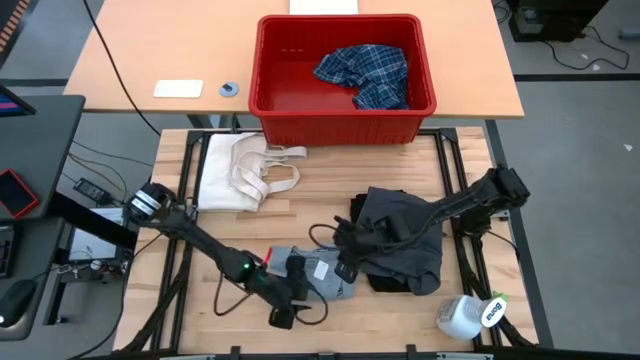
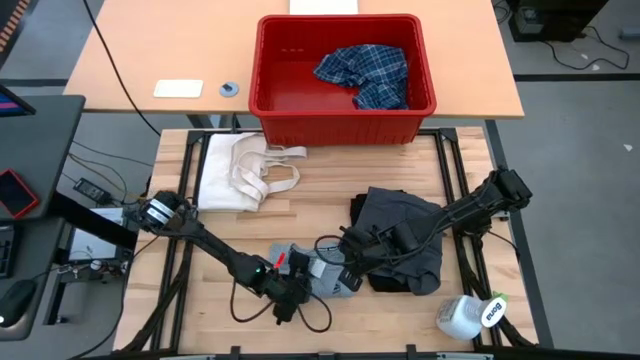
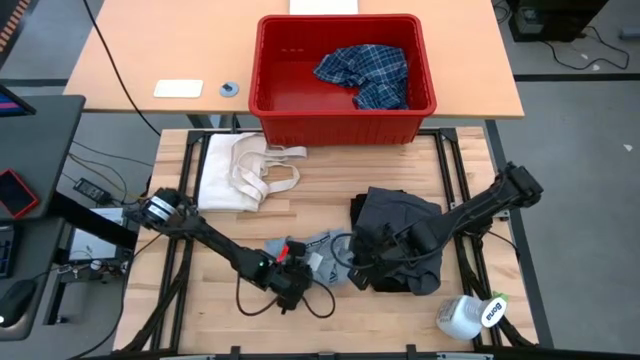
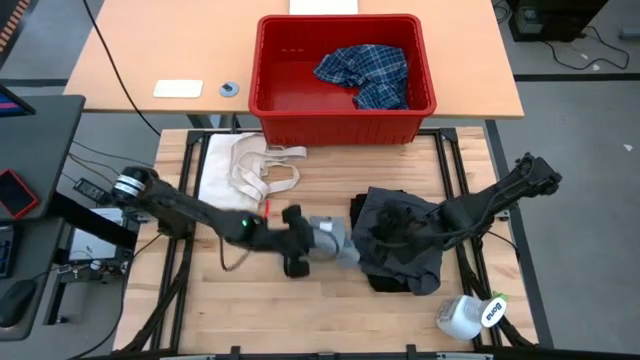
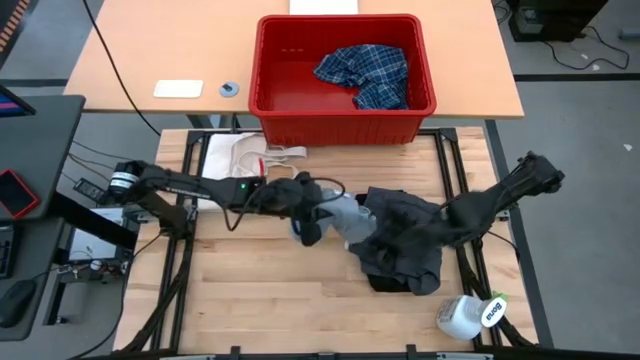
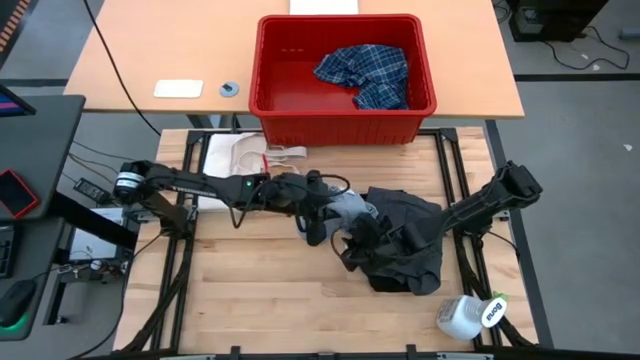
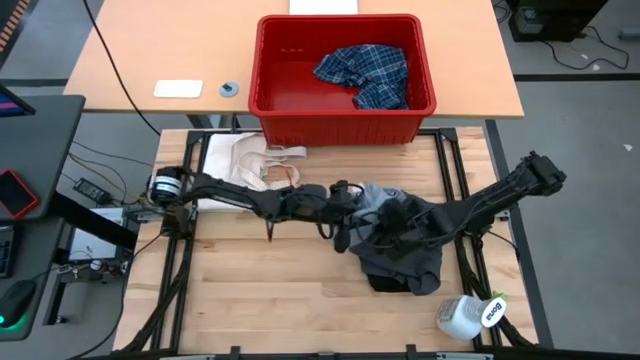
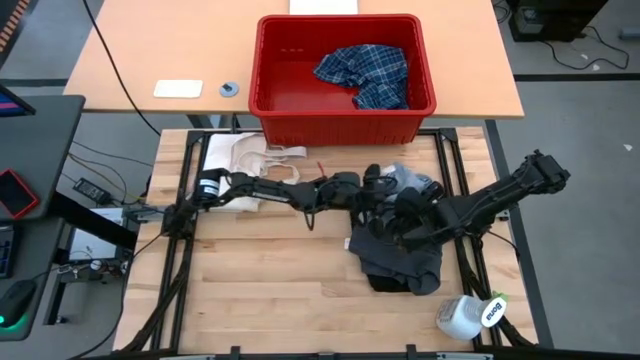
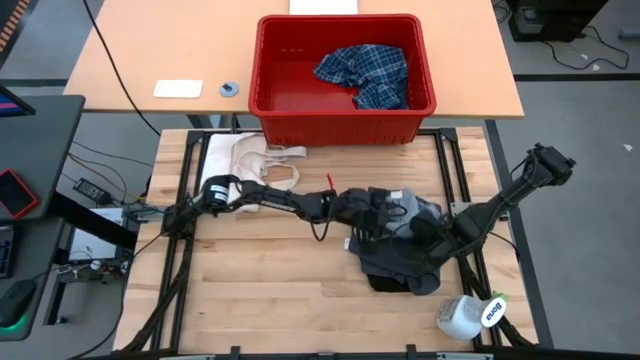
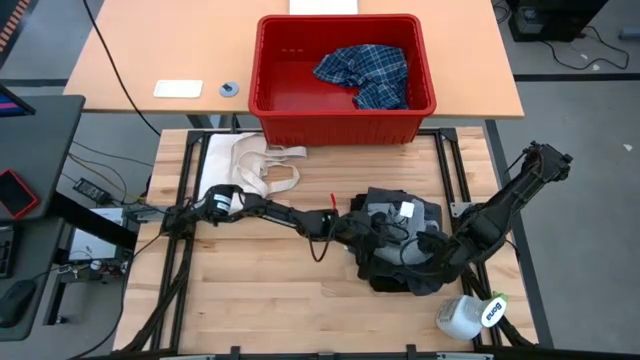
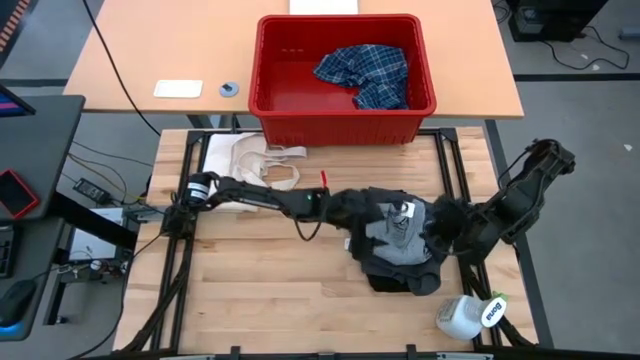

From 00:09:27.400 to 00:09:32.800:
Task: Fold Laundry from Bin
Stack the folded gray shirt on top of the folded gray pants

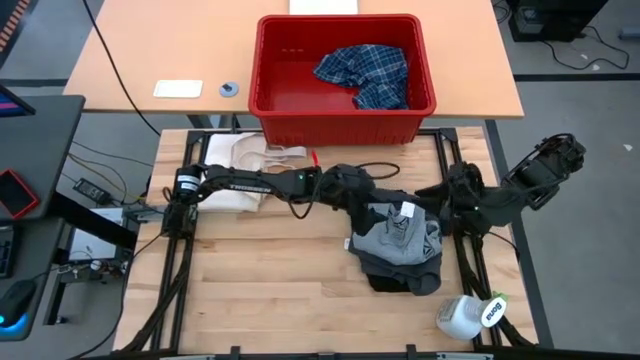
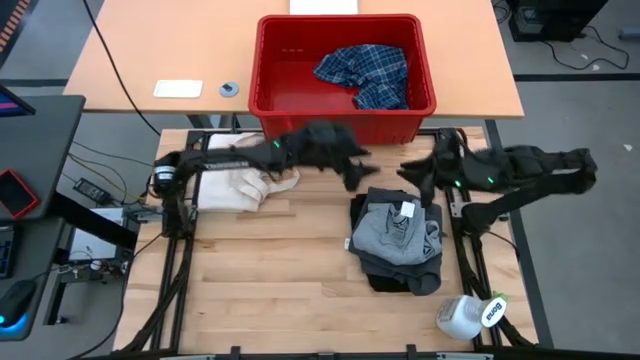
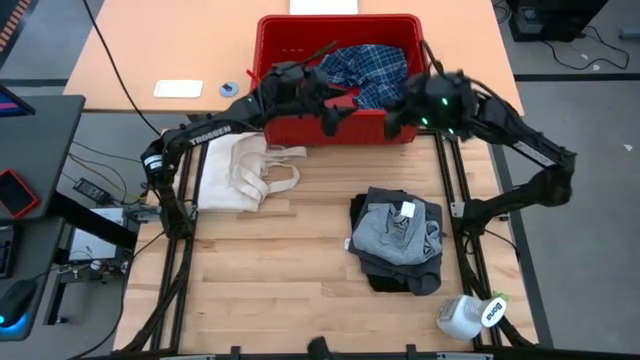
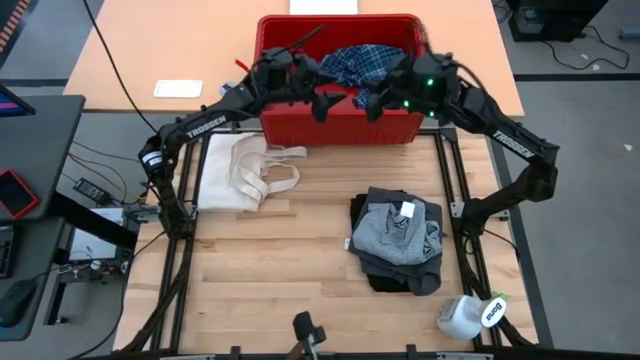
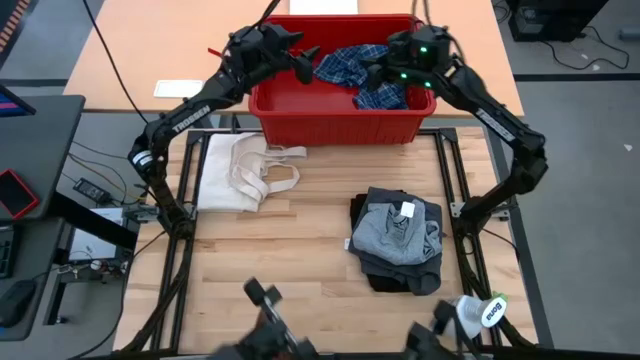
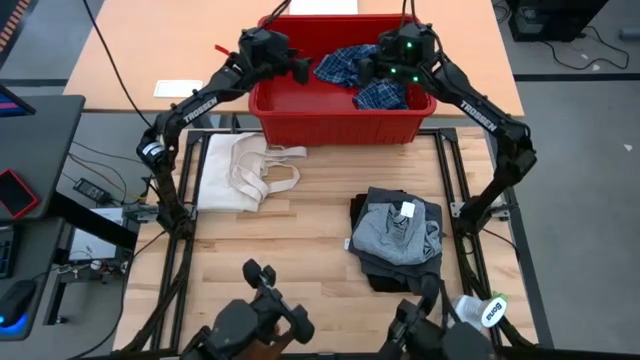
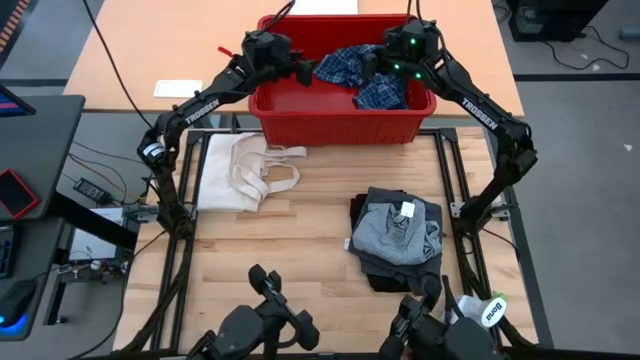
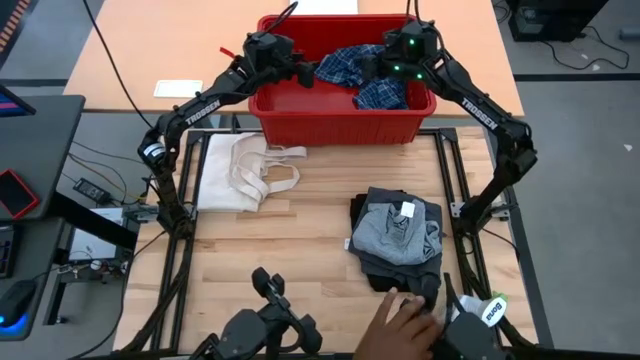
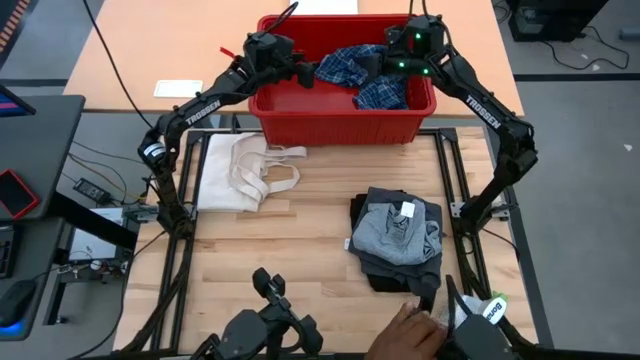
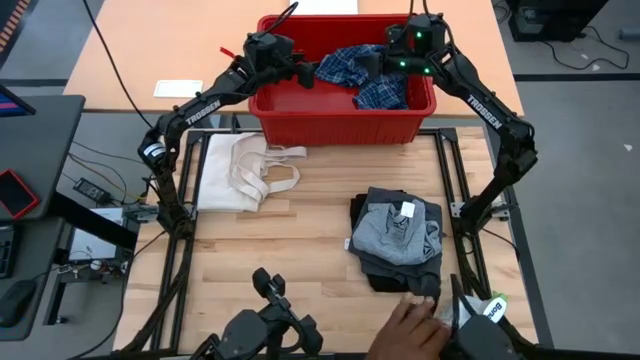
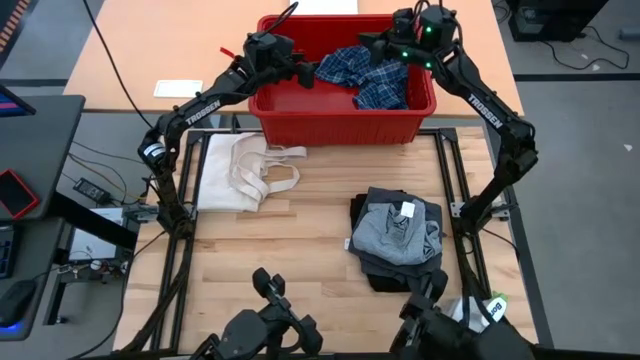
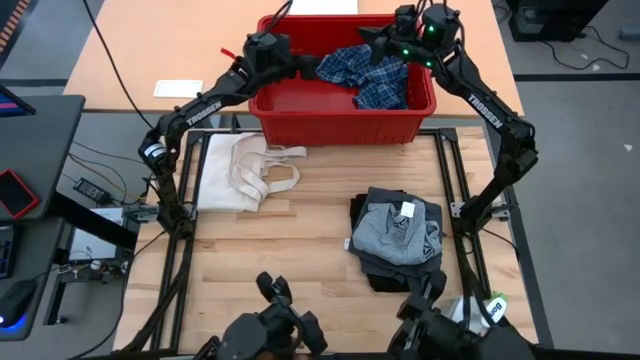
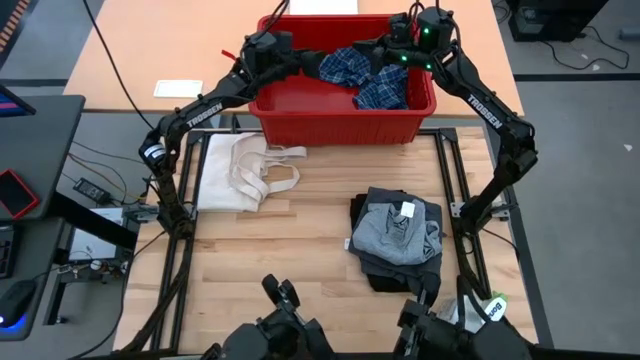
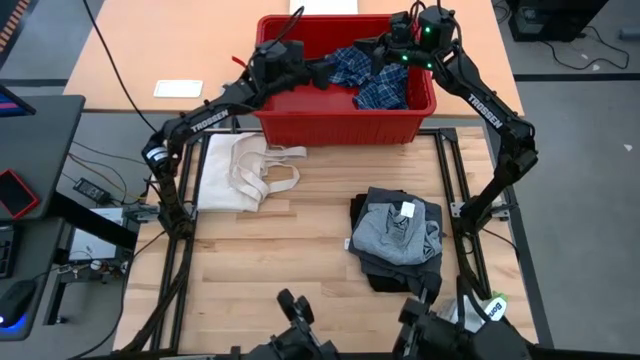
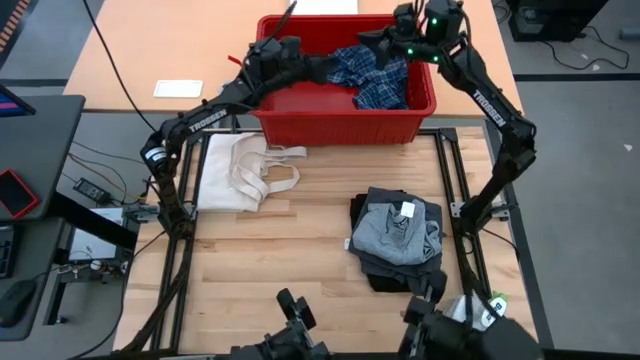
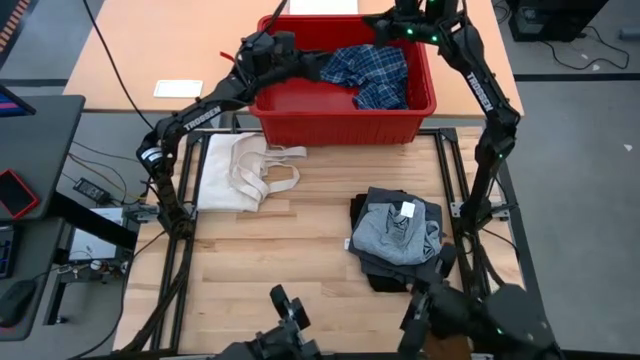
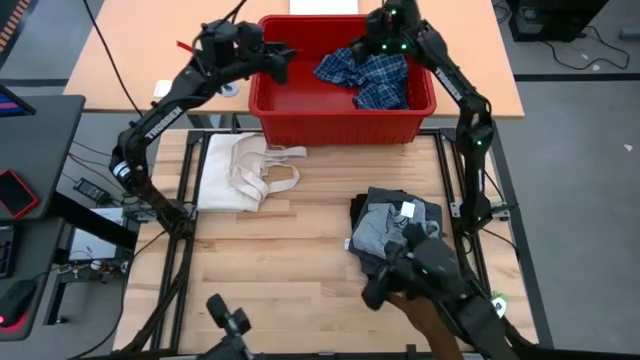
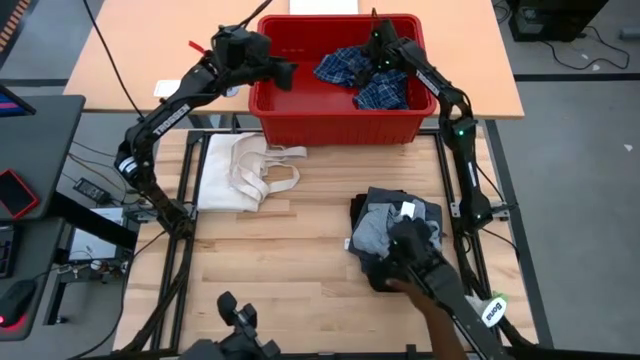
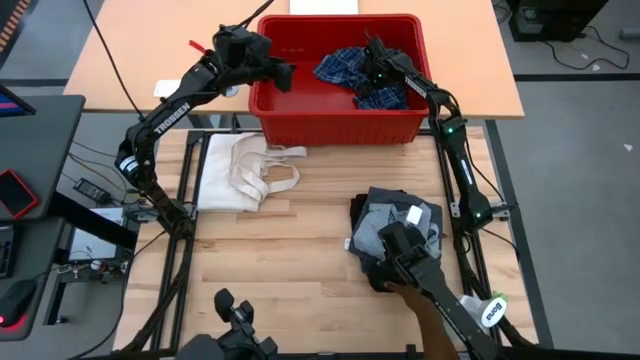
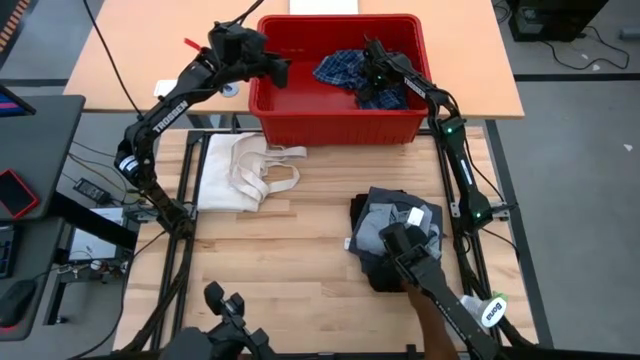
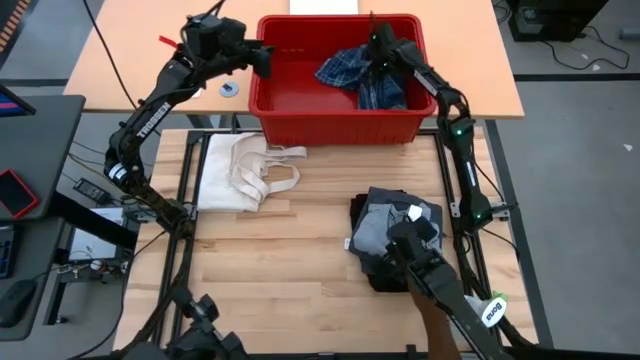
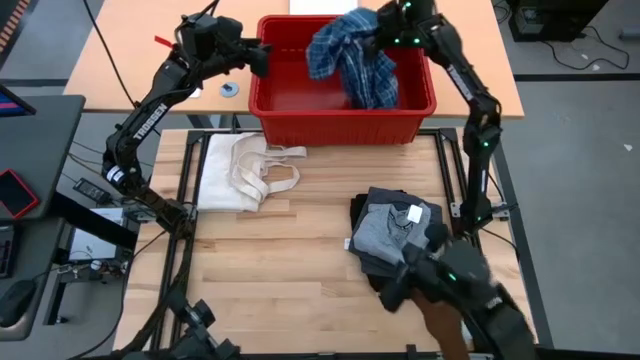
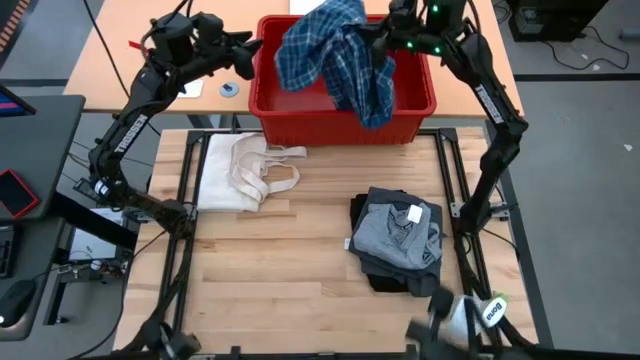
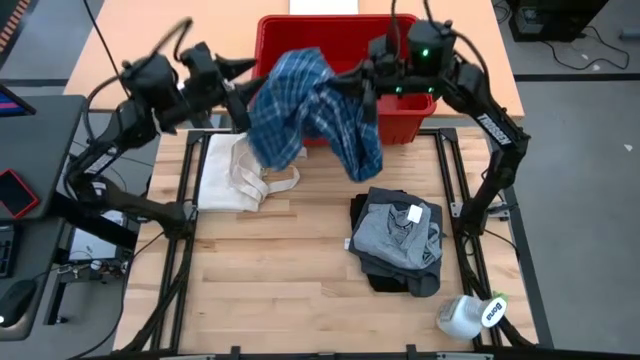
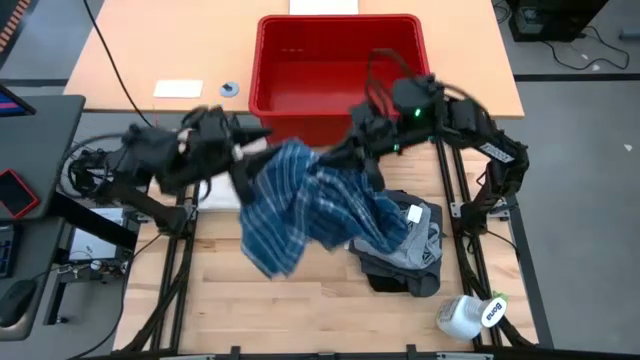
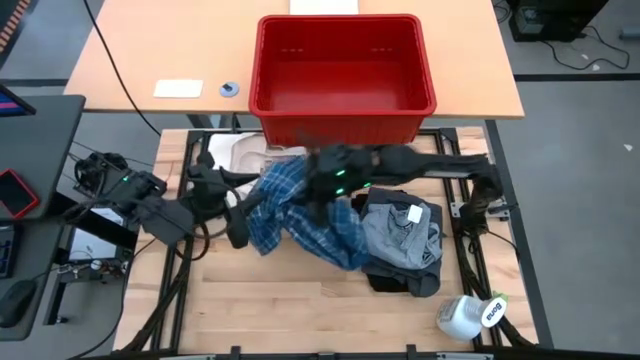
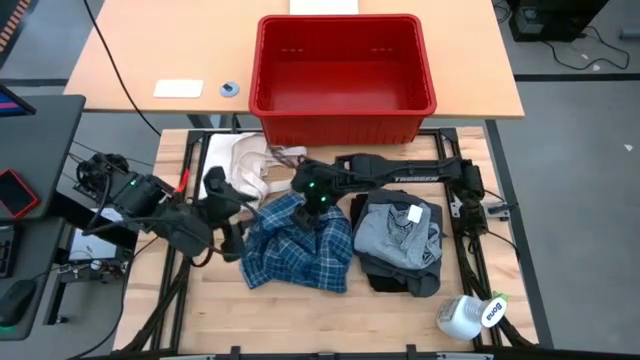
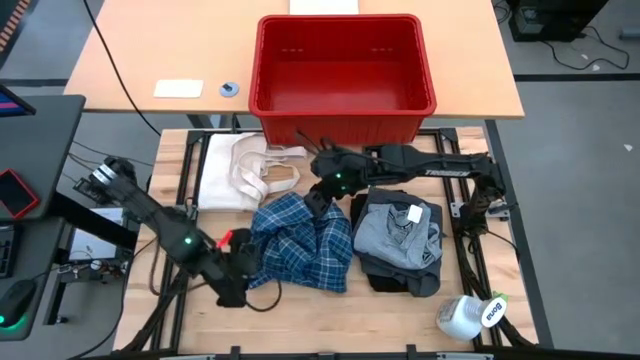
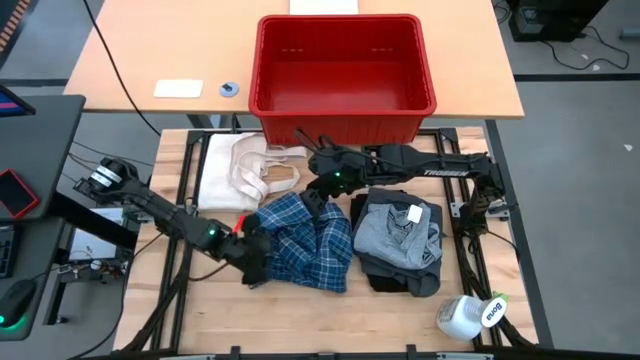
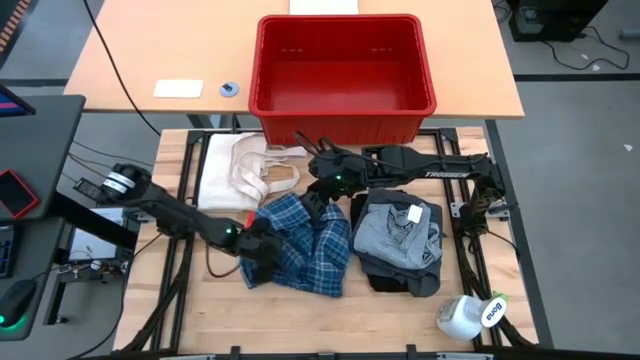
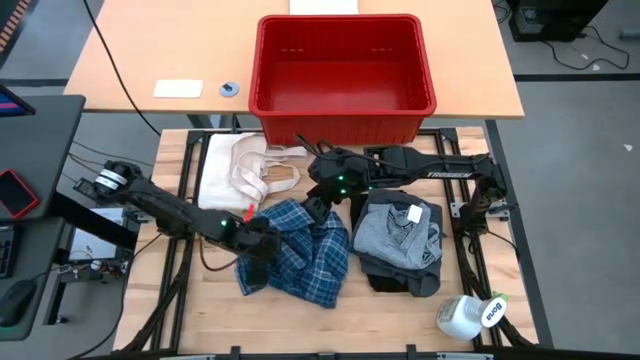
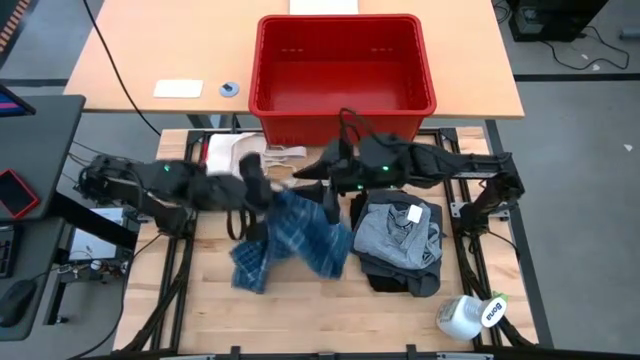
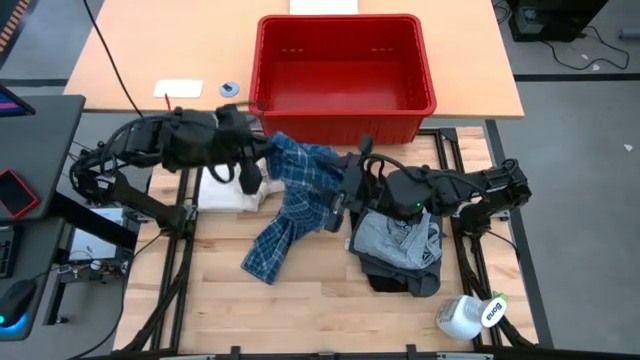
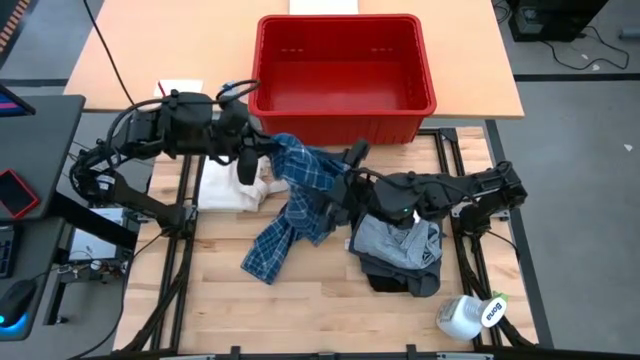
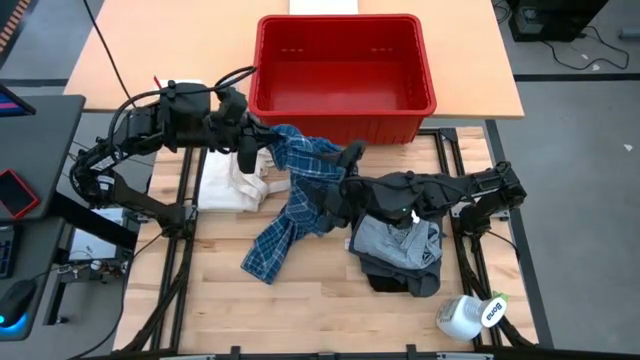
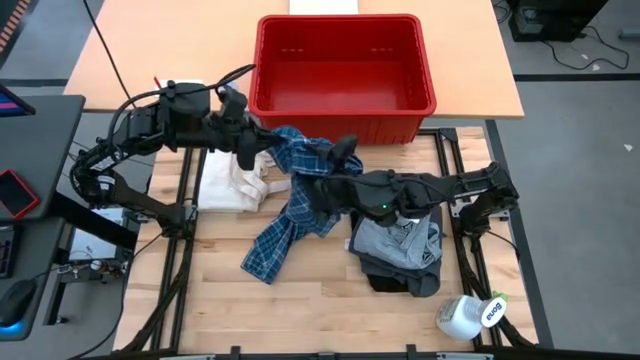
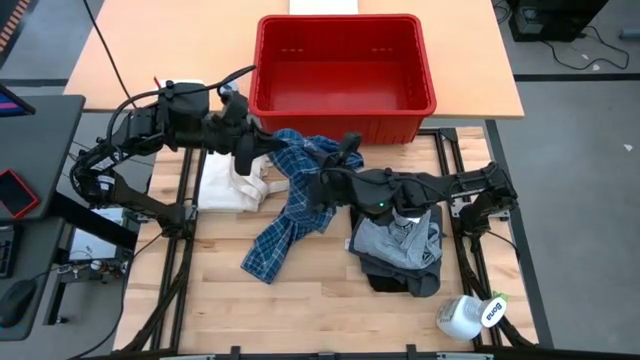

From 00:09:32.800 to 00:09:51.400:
Fold the blue checkered pants
